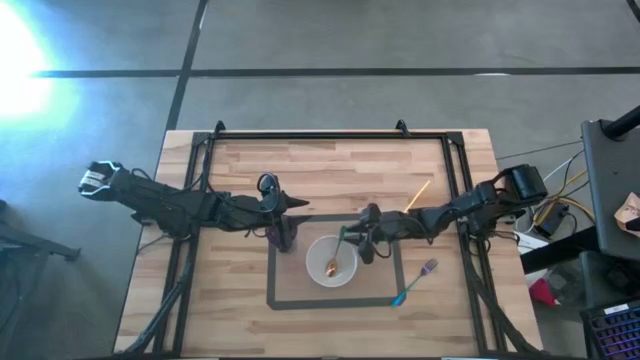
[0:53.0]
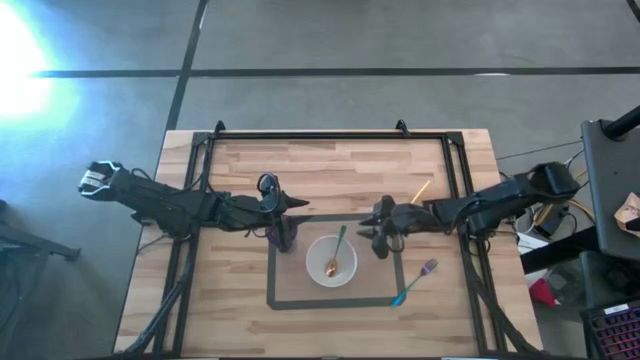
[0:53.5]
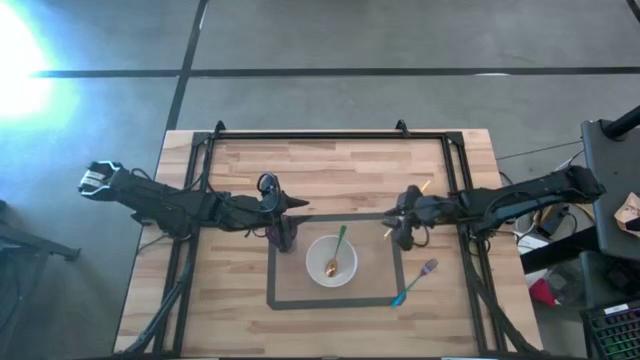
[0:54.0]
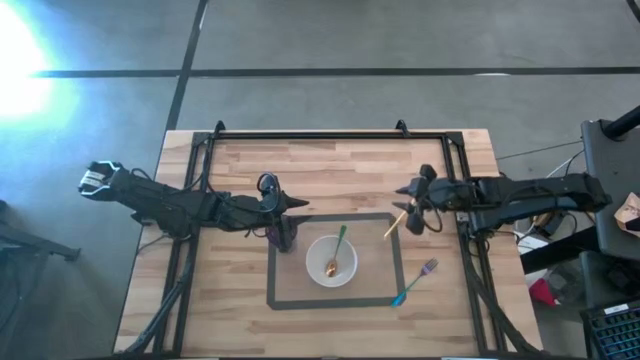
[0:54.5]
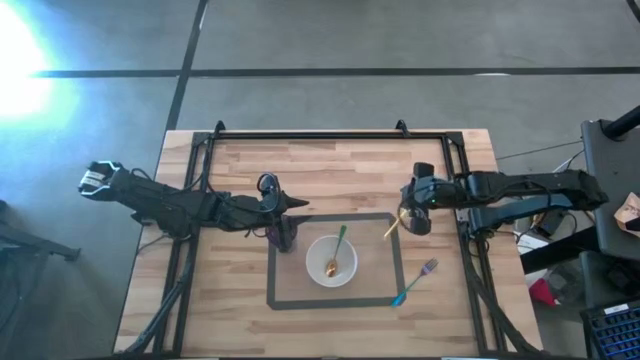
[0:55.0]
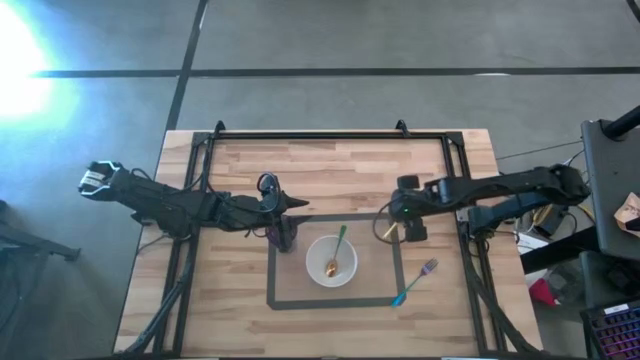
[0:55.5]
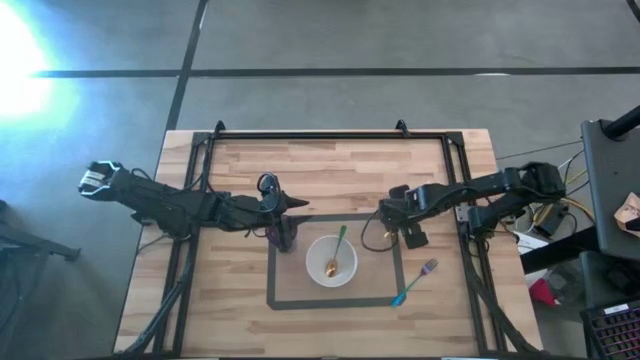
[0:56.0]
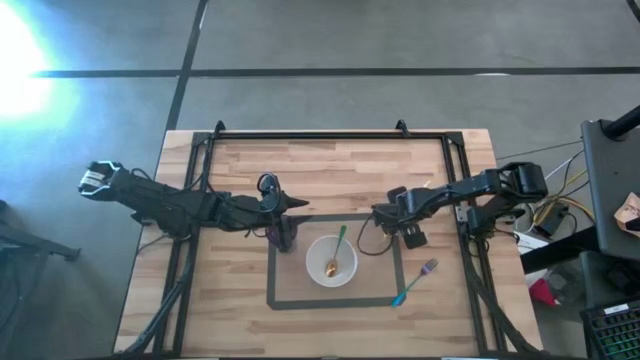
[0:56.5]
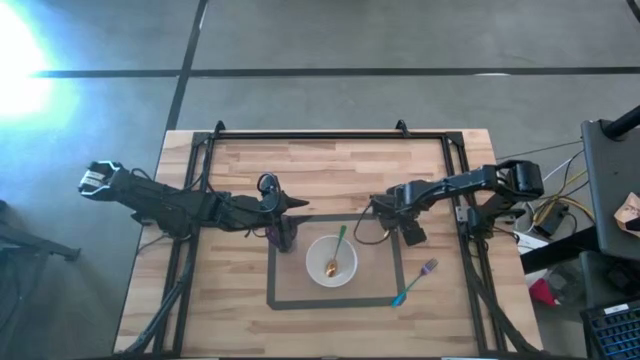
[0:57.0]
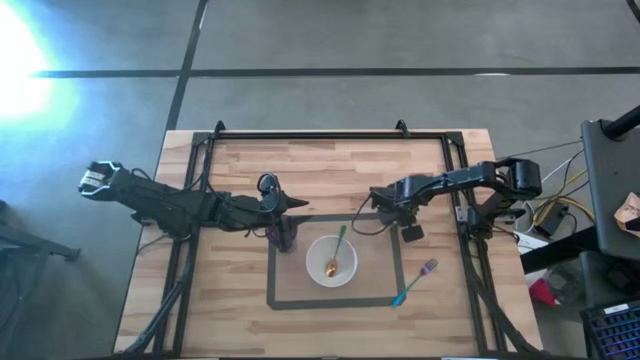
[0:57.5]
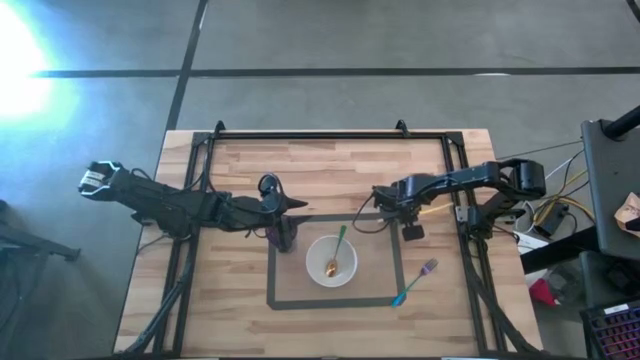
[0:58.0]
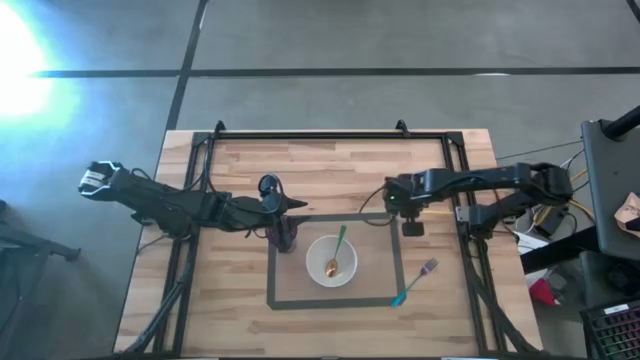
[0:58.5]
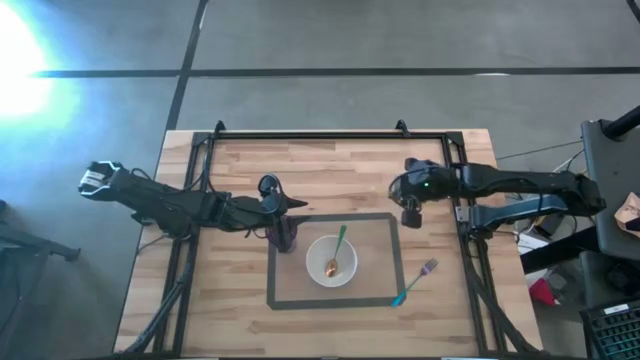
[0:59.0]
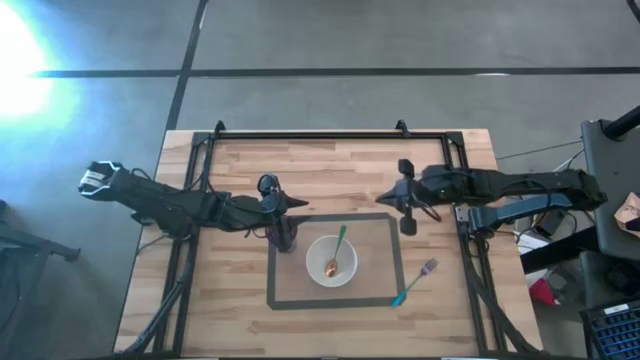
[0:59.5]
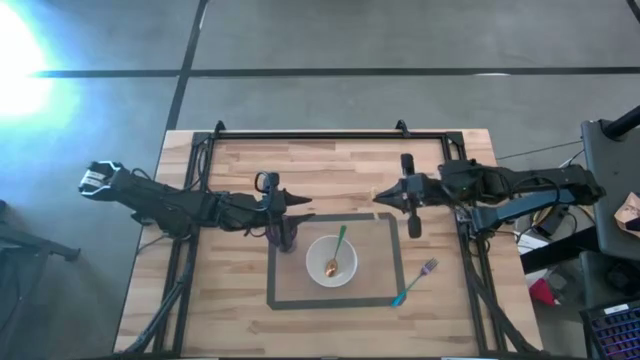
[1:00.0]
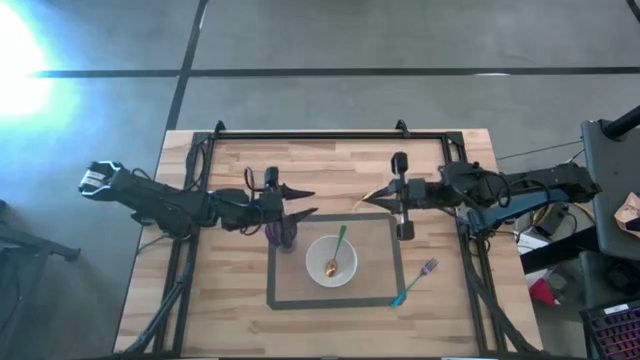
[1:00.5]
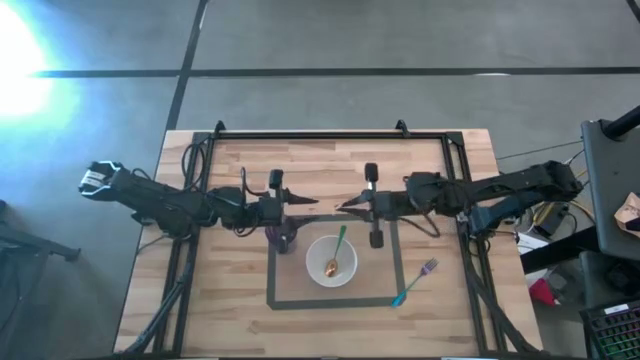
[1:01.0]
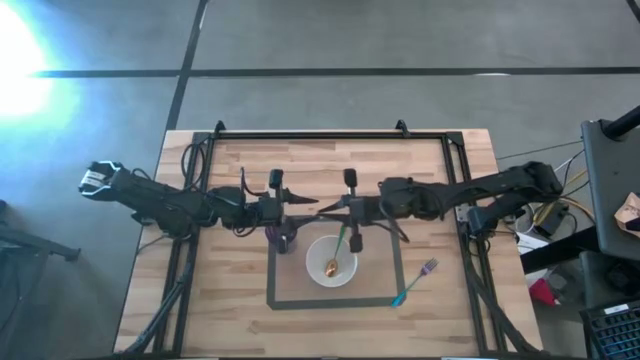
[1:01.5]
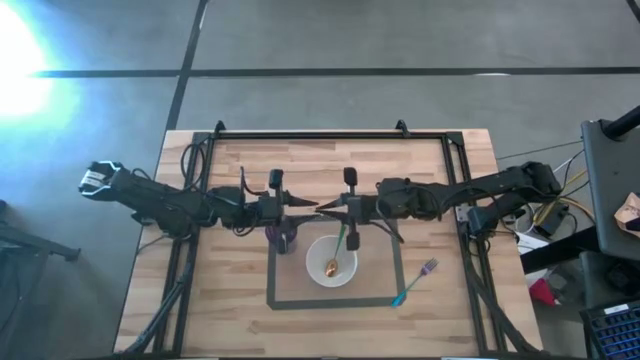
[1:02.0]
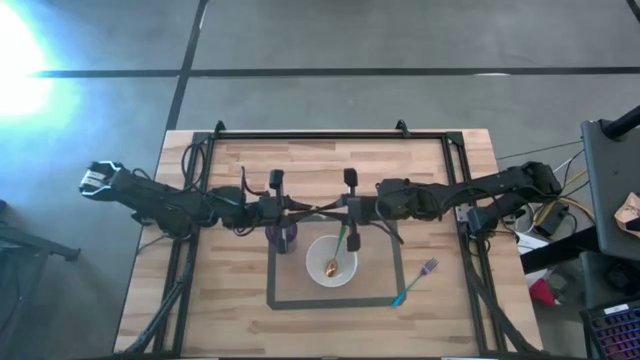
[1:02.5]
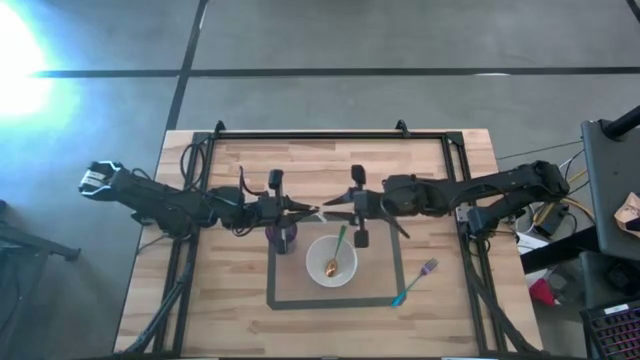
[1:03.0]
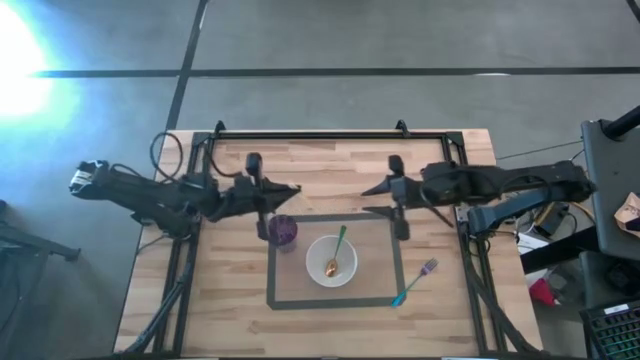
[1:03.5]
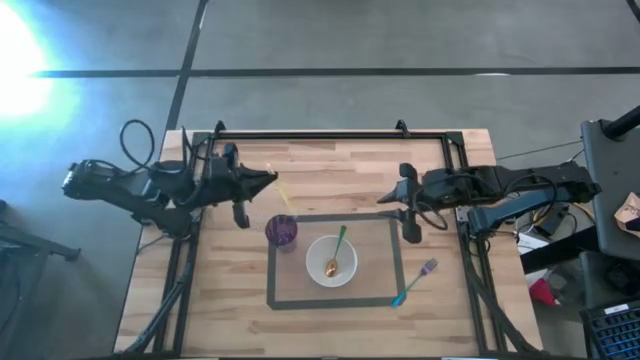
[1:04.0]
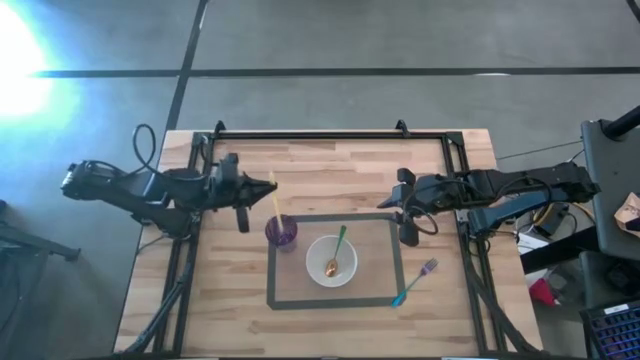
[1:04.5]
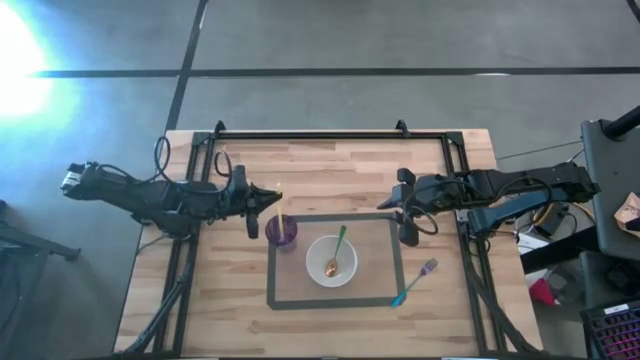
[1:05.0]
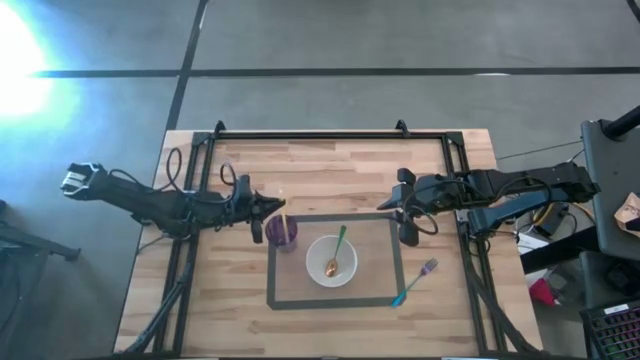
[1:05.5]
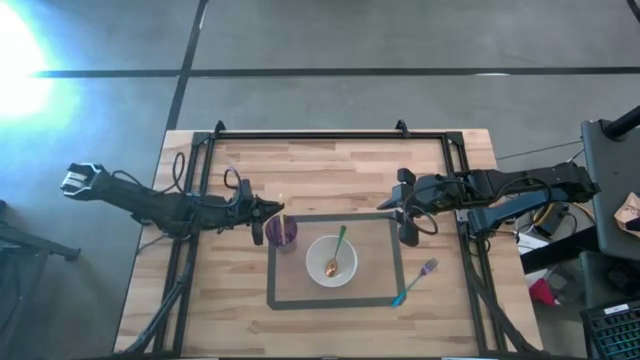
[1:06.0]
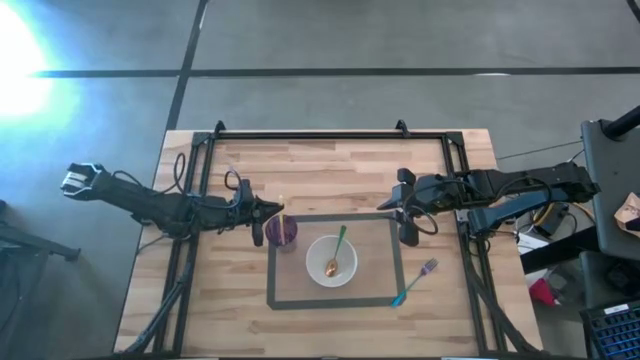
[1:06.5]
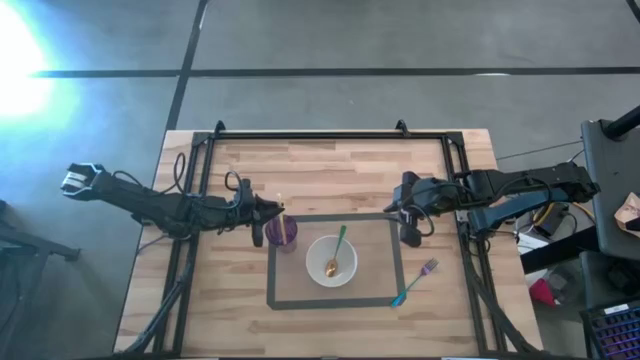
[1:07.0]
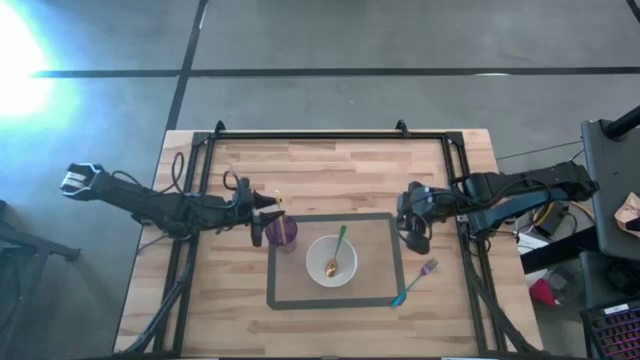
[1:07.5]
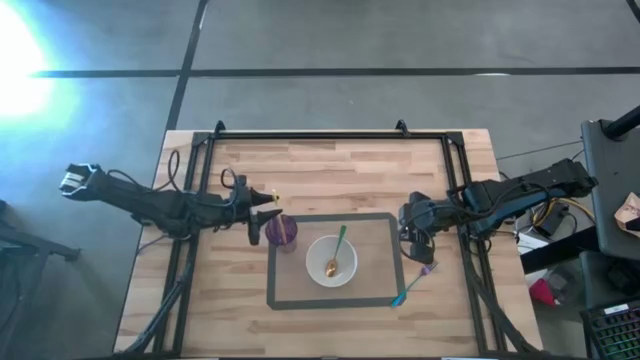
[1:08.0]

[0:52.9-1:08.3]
Task: Pick & Place Utensil
Put the yellow straw into the purple cup

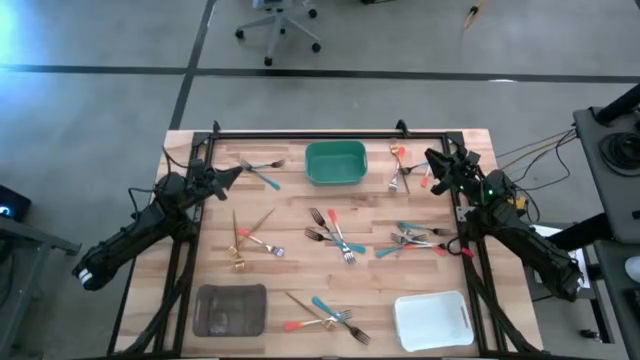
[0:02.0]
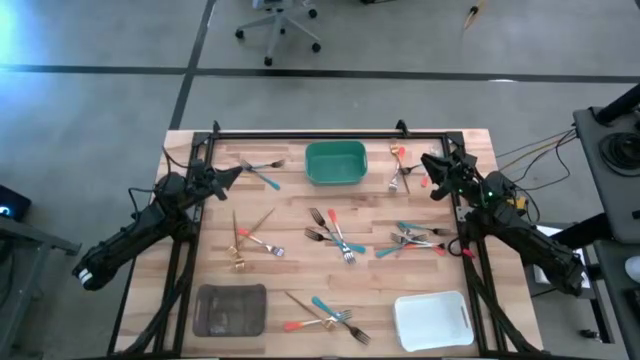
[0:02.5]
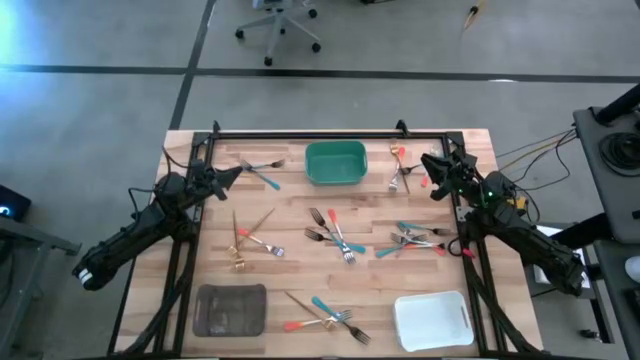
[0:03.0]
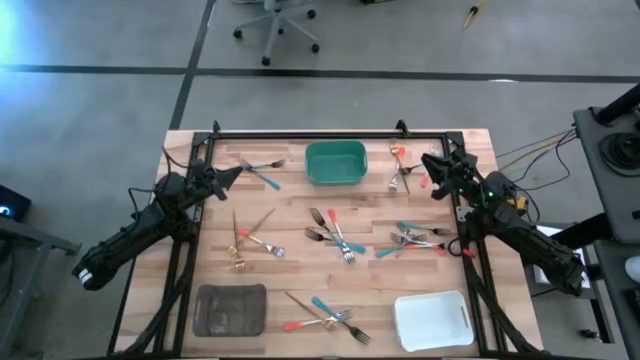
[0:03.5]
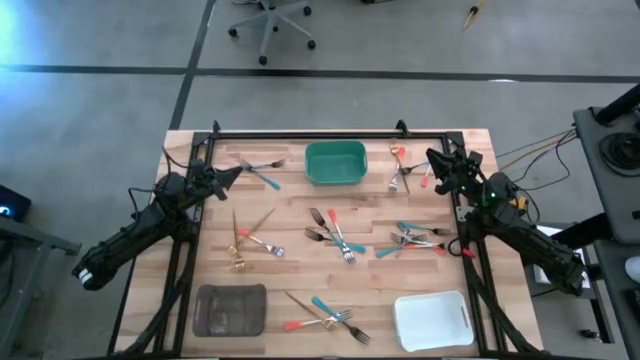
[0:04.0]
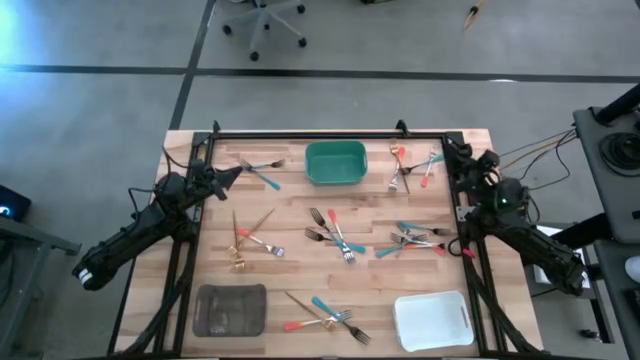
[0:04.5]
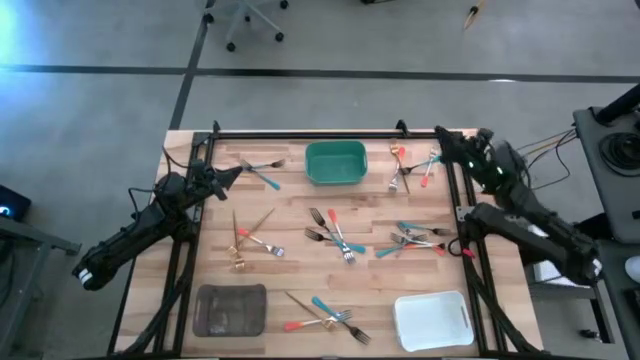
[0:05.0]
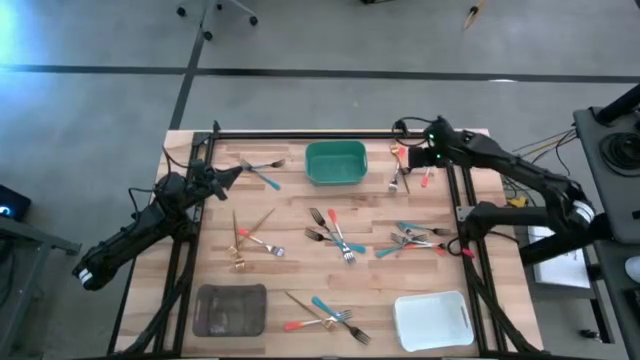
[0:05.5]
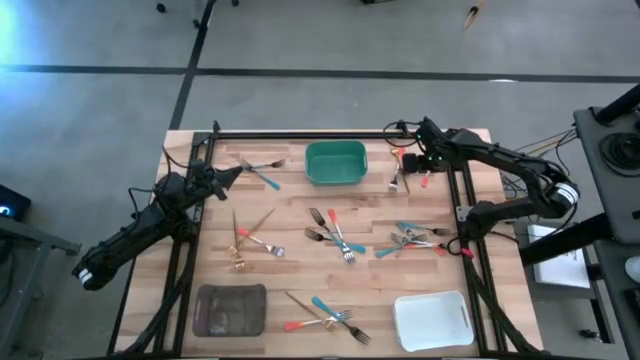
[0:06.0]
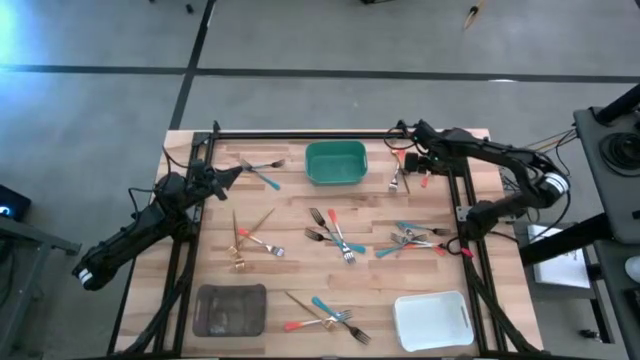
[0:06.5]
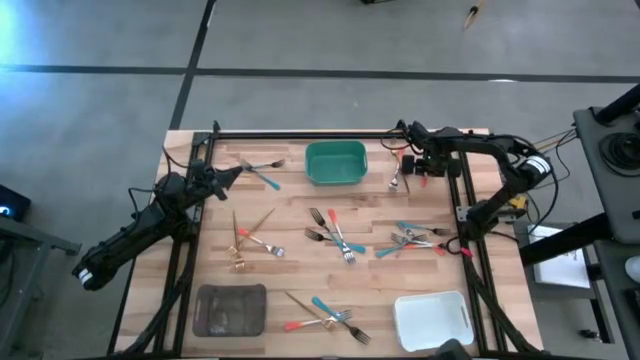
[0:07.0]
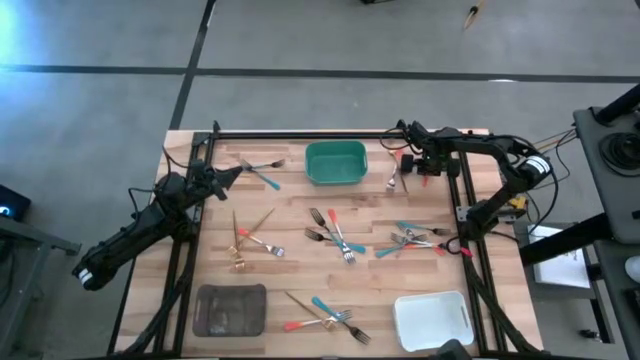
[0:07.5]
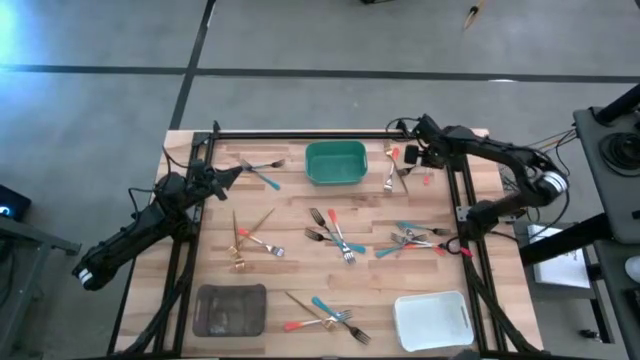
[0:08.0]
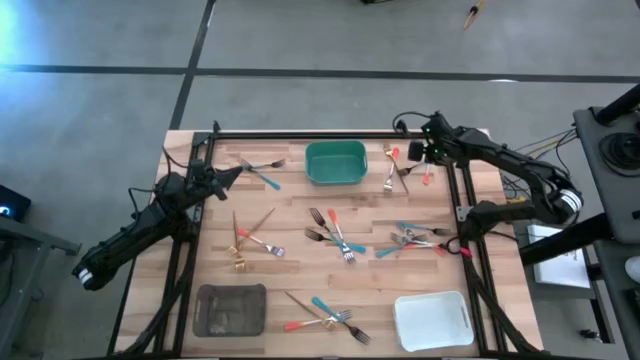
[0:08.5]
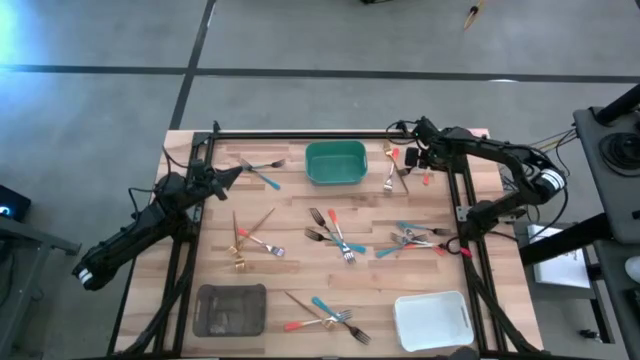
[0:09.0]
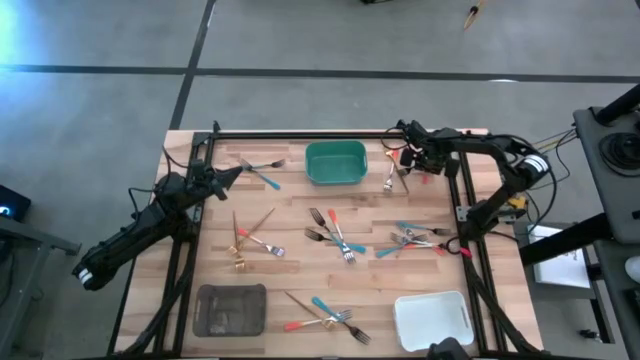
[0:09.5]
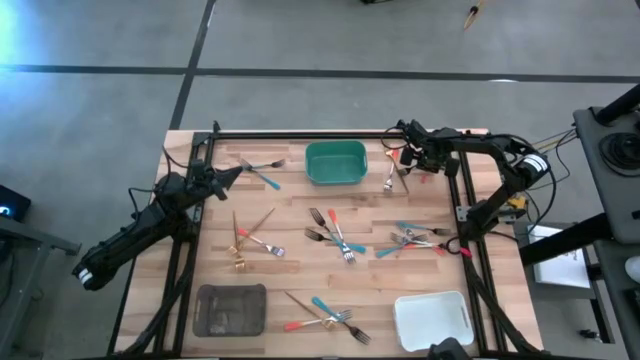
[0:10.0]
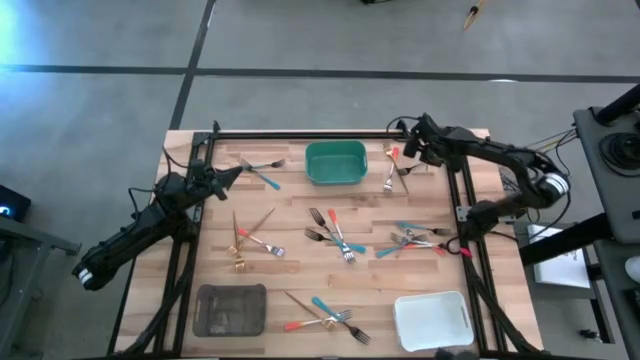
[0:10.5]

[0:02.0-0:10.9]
Task: Sort silverware by color (type)
Put the orange fork into the green bin
